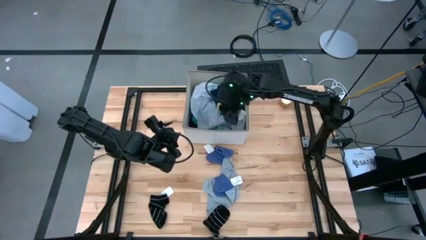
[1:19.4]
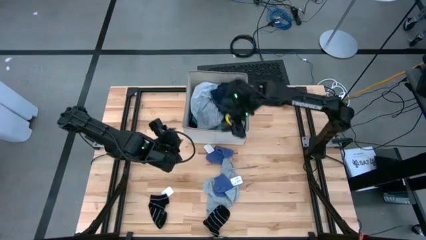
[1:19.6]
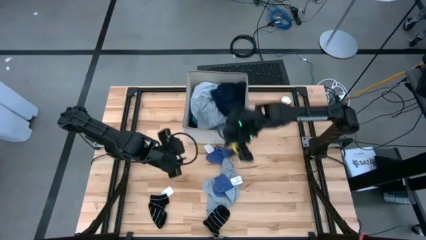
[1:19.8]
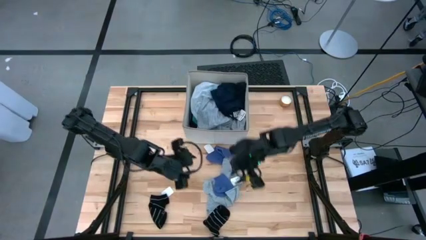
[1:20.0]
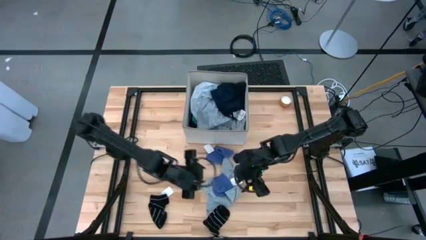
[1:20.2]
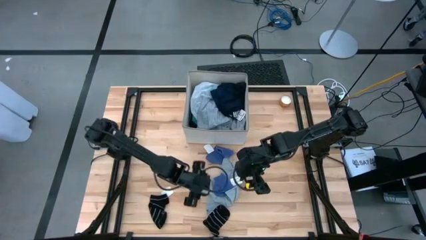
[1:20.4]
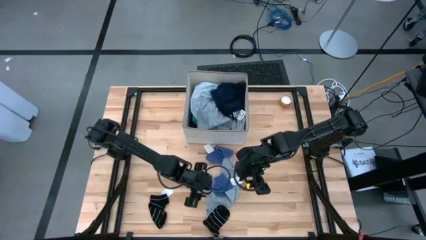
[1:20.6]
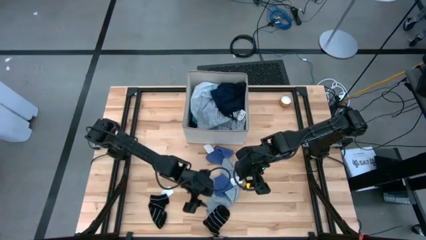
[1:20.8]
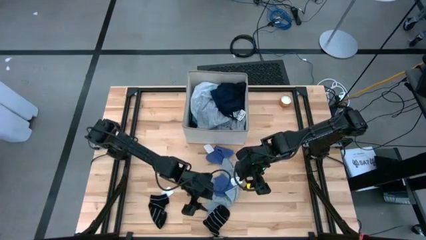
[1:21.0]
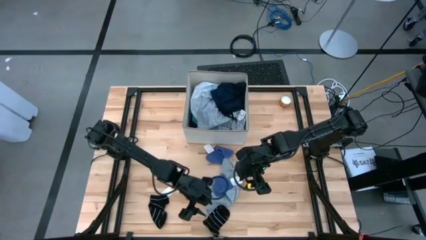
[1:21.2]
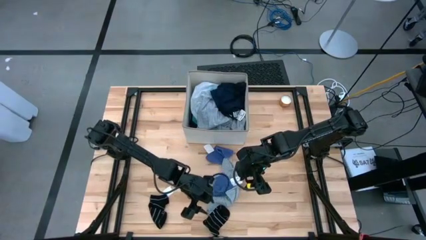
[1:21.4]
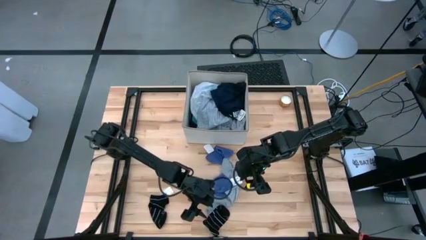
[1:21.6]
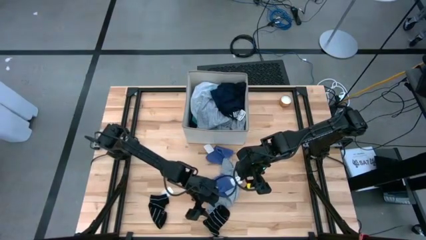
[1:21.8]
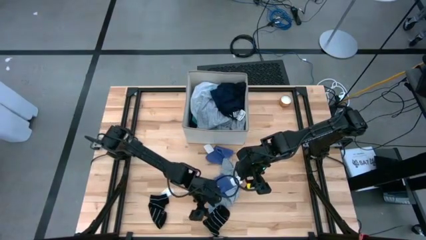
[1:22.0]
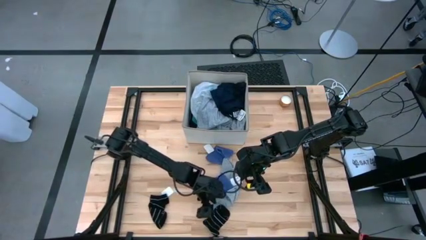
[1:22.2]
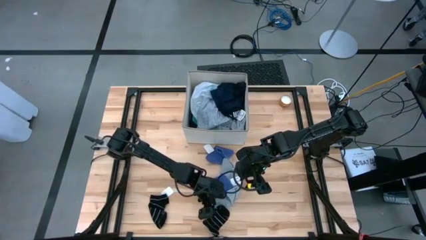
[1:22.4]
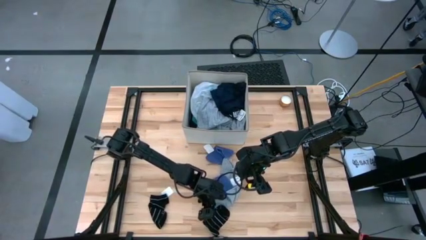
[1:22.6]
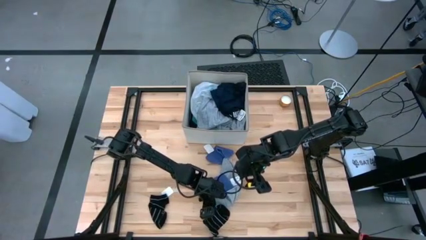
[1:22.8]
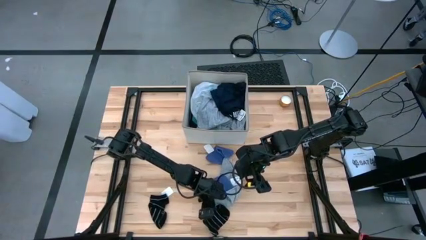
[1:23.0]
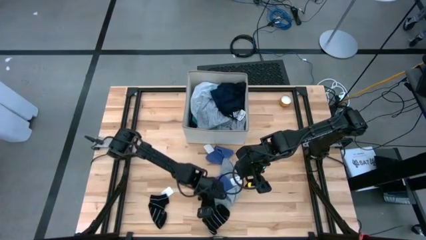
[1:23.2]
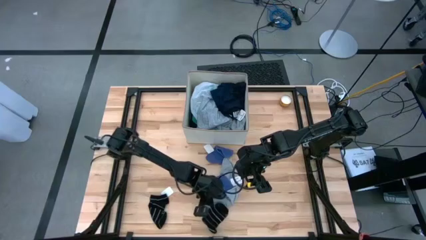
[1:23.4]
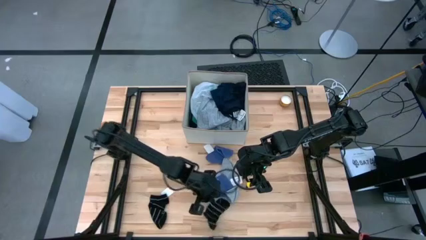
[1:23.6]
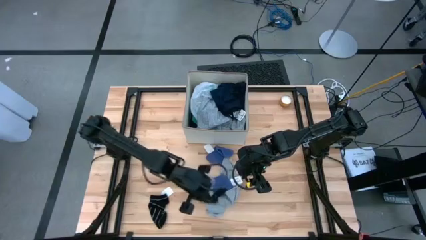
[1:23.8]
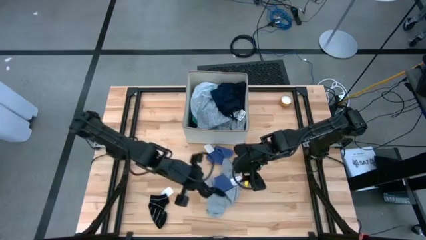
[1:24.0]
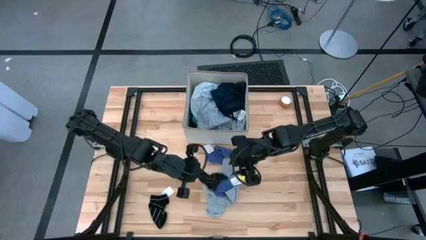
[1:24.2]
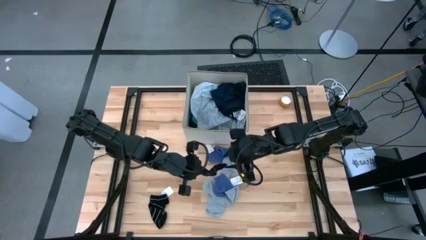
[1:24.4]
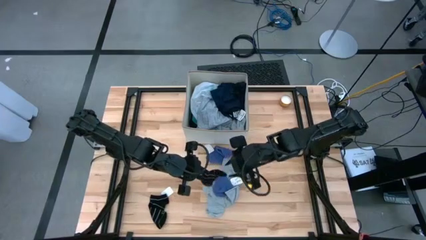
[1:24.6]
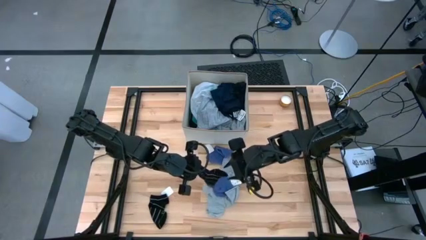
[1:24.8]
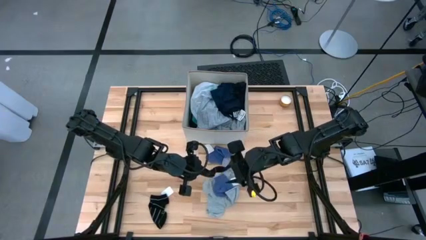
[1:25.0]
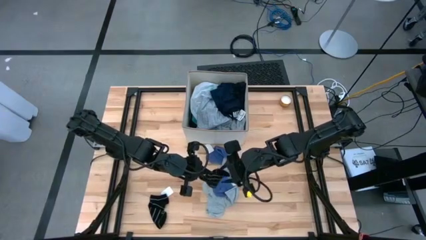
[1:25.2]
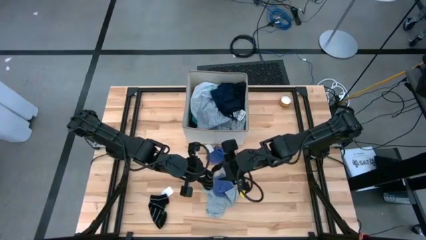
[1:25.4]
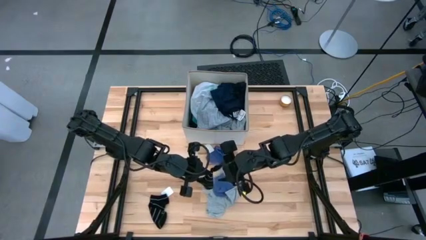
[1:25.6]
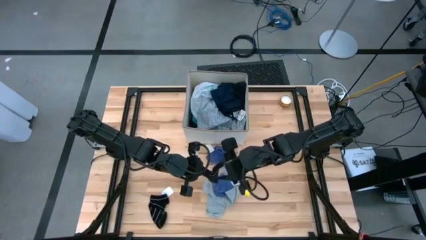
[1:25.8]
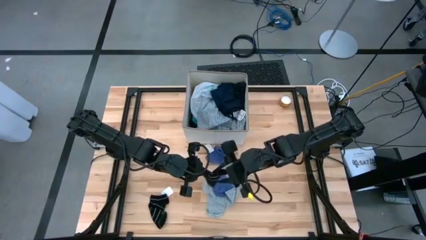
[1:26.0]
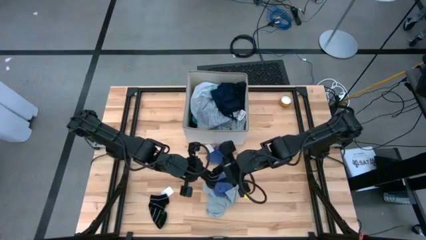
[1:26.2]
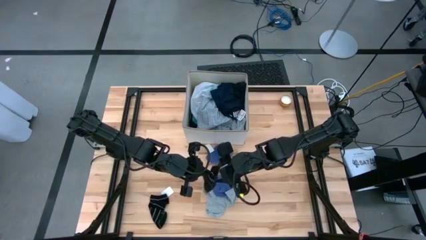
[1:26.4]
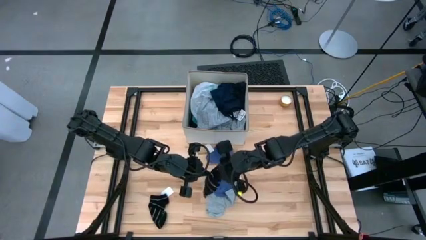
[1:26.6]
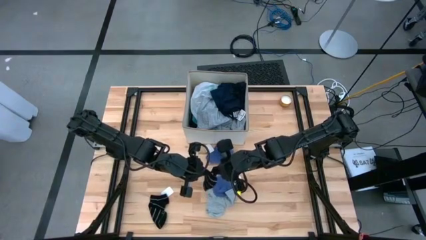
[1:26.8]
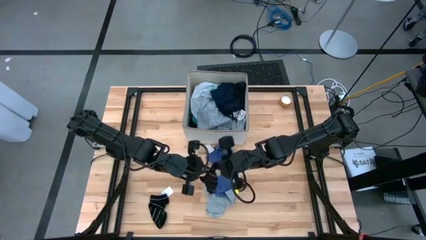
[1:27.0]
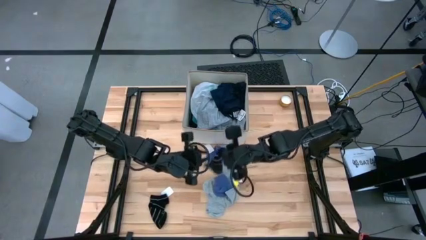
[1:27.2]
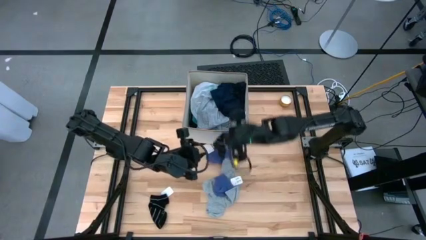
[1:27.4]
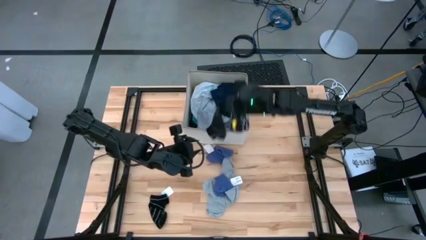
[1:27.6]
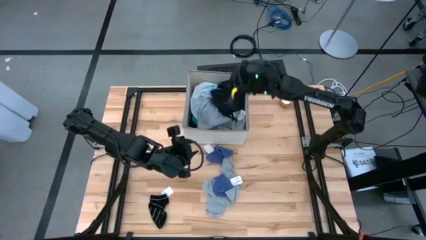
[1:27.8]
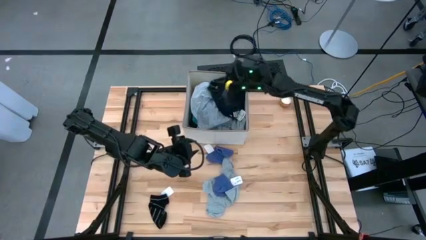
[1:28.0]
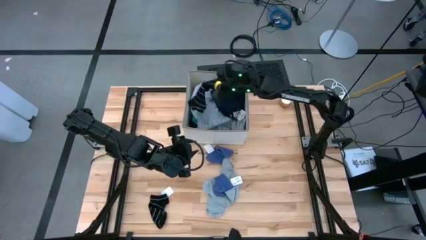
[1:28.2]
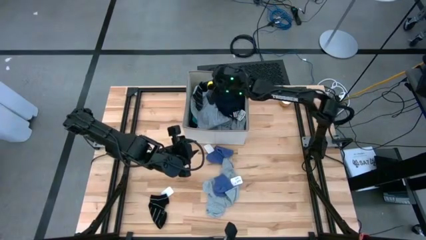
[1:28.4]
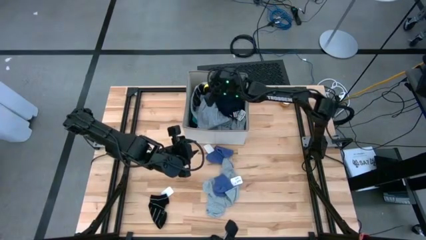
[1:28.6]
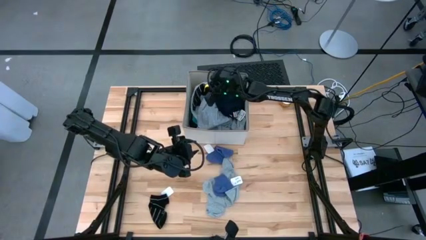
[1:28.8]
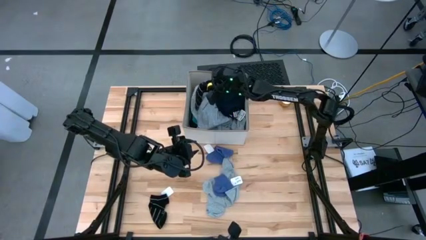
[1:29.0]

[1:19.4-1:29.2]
Task: Sort clothes
Put the right black-striped sock into the laundry bin

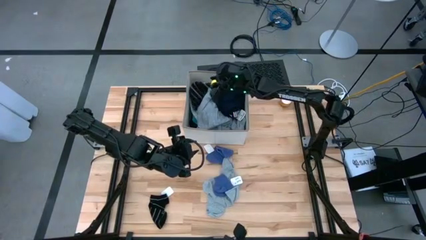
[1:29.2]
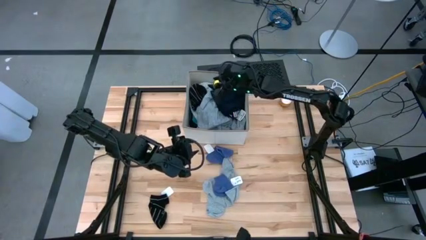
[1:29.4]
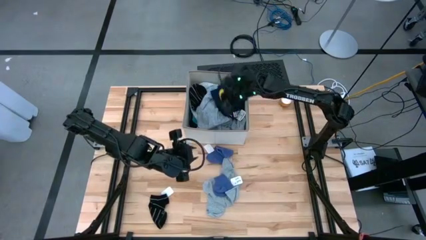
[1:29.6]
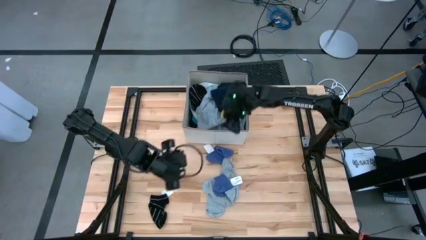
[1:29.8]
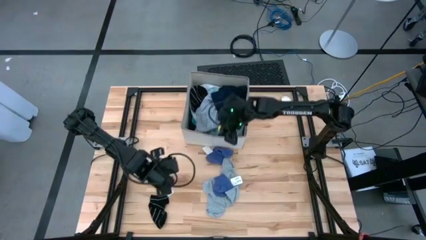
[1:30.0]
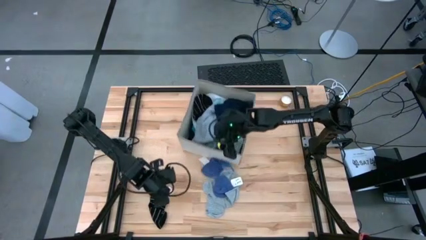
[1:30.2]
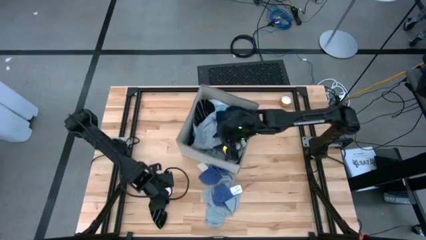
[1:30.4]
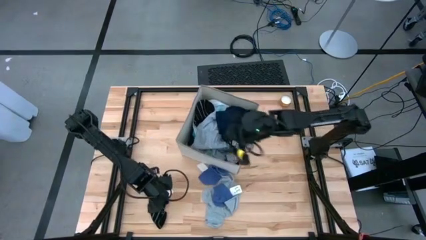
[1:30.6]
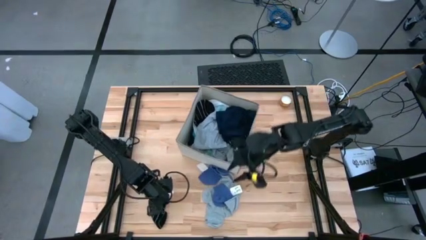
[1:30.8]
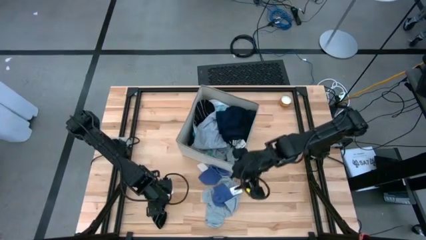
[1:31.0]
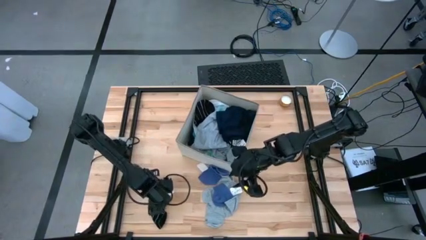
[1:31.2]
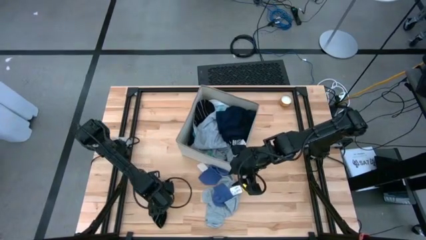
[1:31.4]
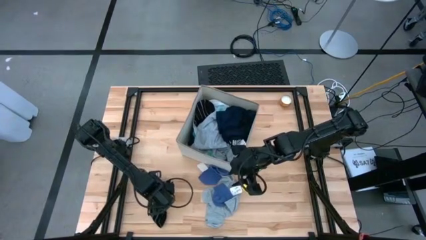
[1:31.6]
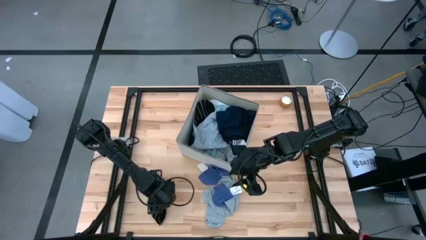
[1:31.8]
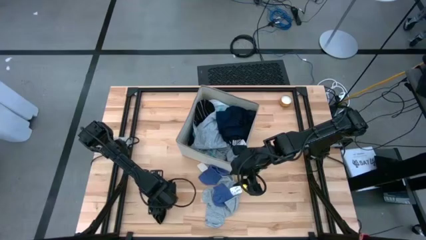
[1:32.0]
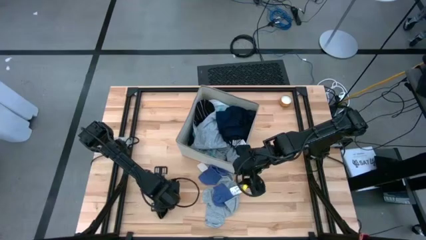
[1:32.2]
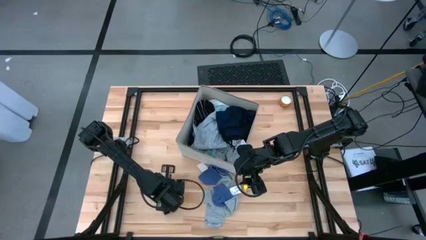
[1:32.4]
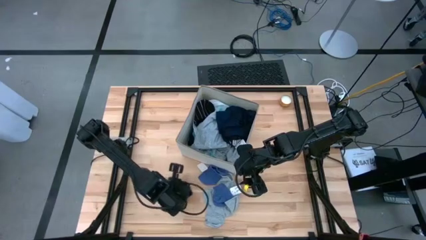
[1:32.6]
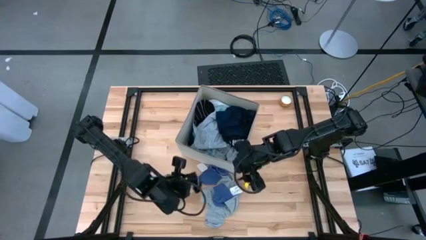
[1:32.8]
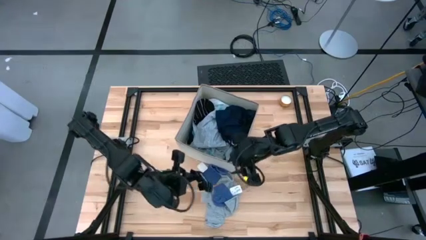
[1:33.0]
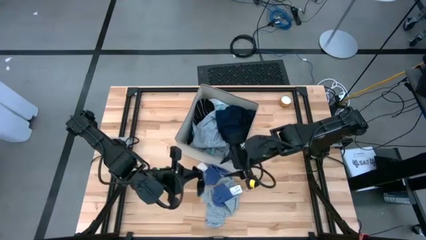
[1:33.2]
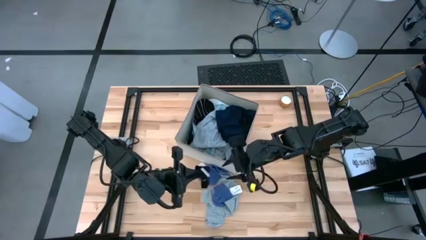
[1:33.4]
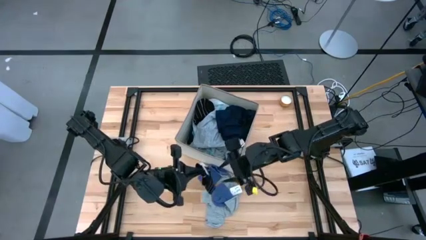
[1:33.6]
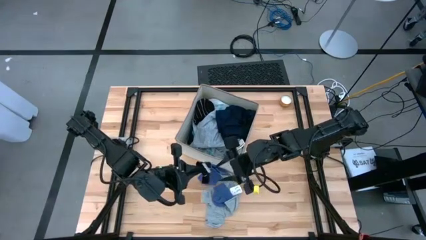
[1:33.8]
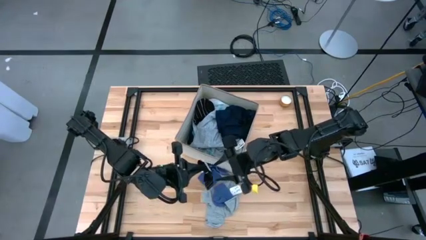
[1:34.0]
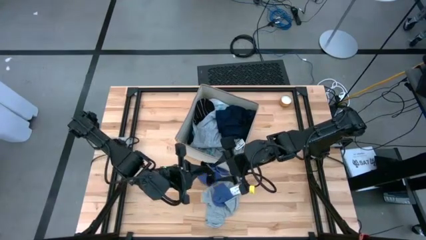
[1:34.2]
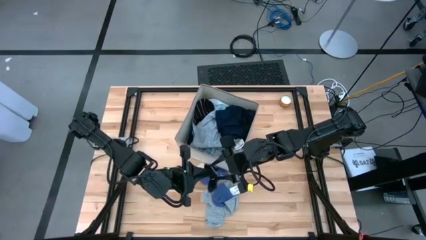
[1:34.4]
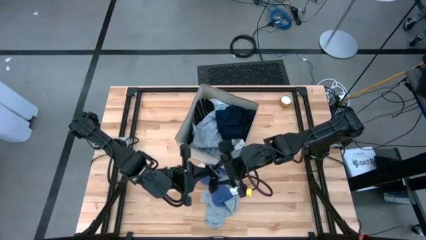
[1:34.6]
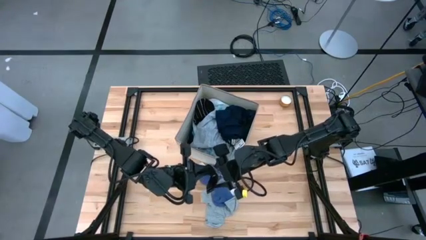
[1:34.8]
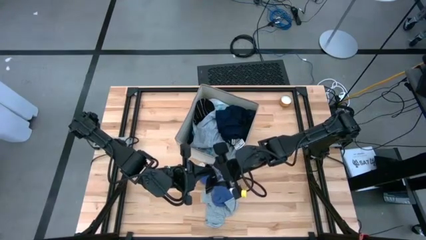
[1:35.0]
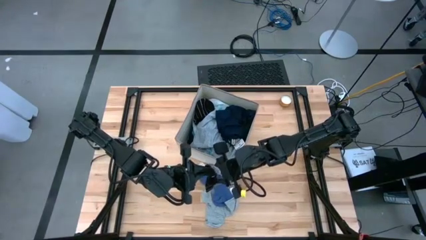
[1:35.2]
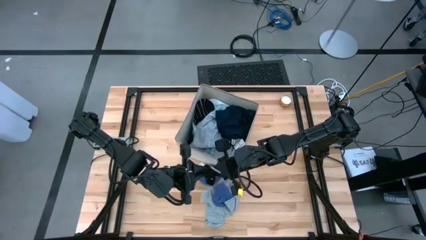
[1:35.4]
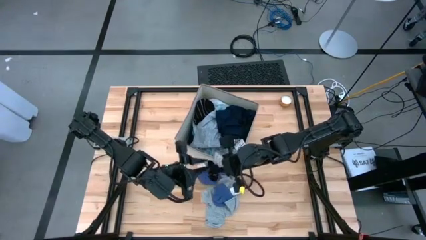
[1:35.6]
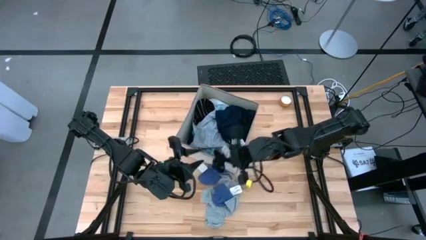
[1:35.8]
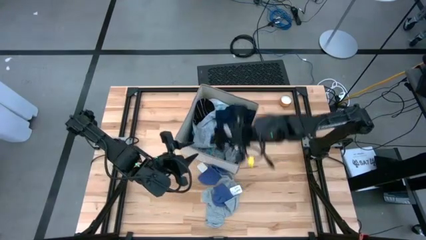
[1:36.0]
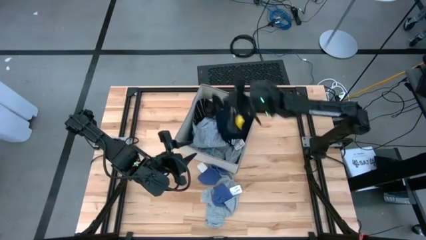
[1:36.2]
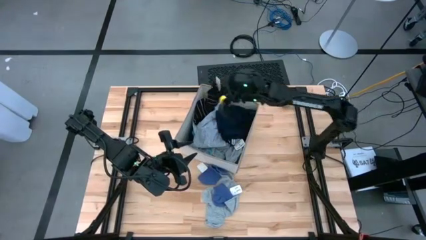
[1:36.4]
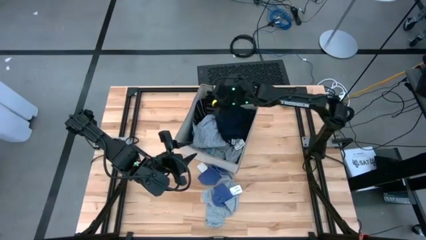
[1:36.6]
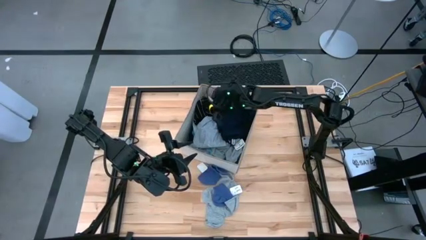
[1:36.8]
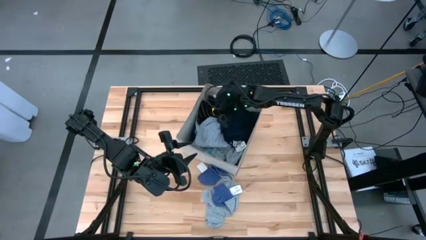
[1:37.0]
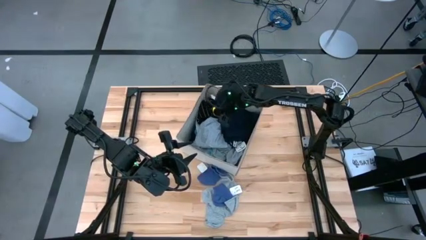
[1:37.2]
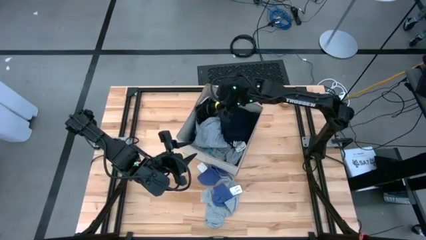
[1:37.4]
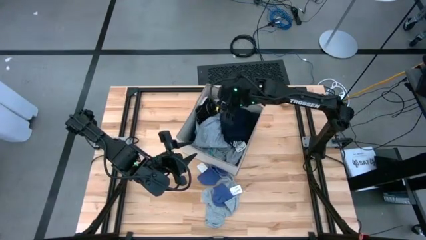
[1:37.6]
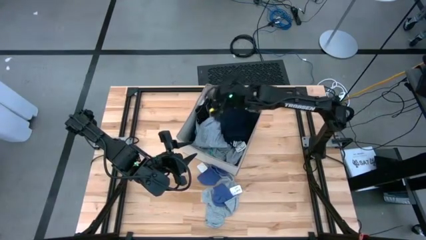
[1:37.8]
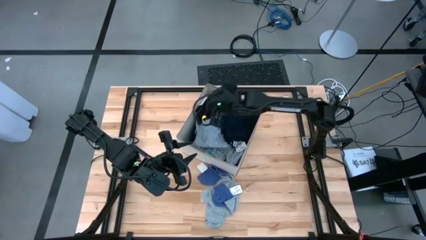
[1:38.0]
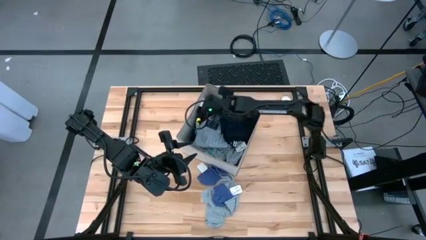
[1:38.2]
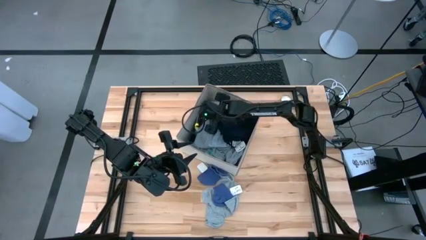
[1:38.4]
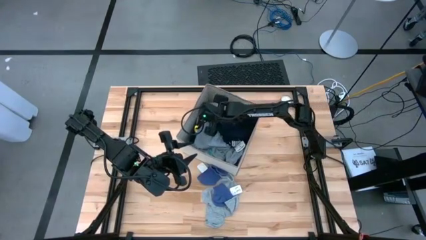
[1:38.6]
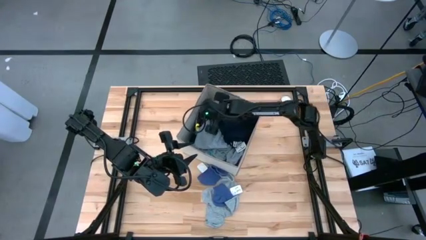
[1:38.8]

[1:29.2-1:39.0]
Put the black-striped sock into the laundry bin
